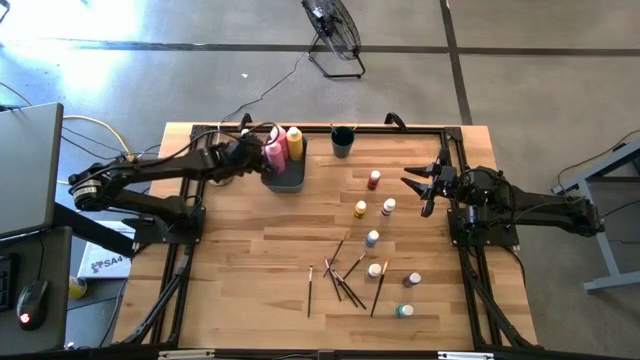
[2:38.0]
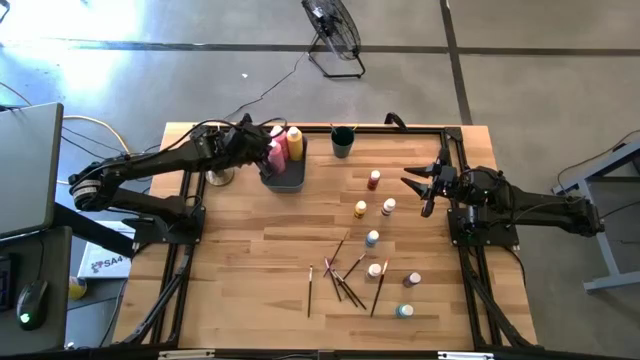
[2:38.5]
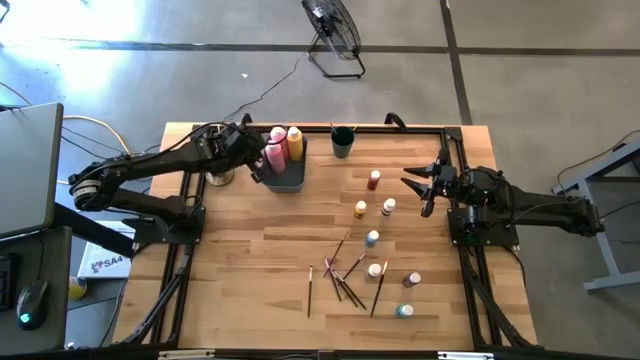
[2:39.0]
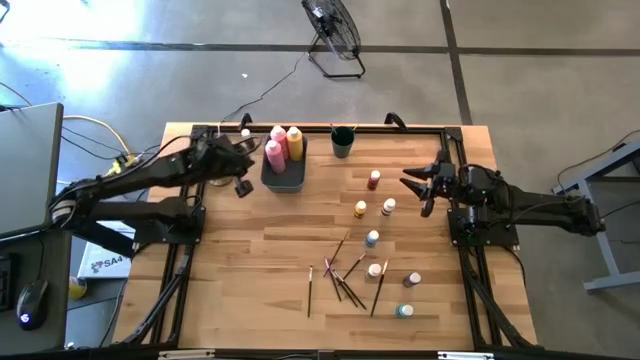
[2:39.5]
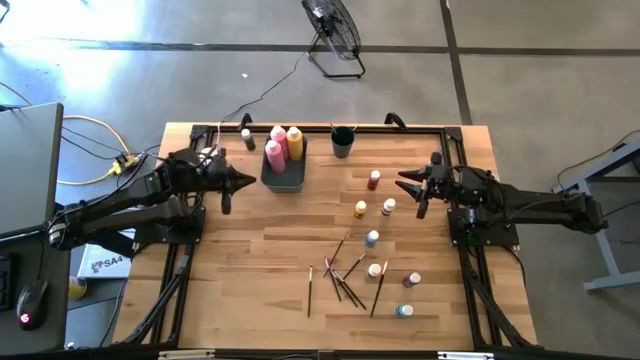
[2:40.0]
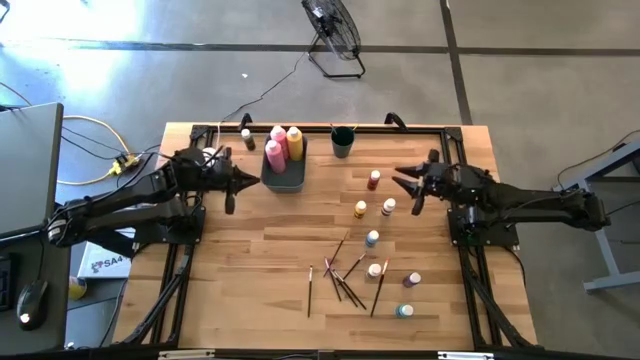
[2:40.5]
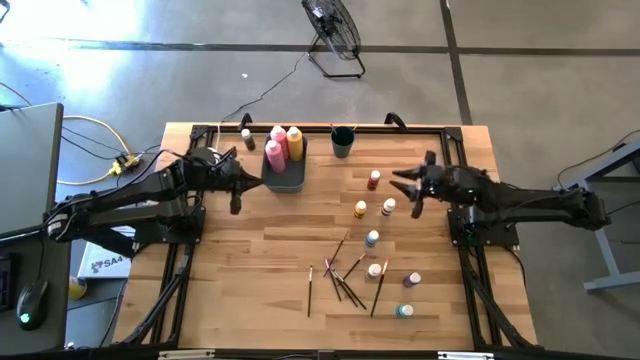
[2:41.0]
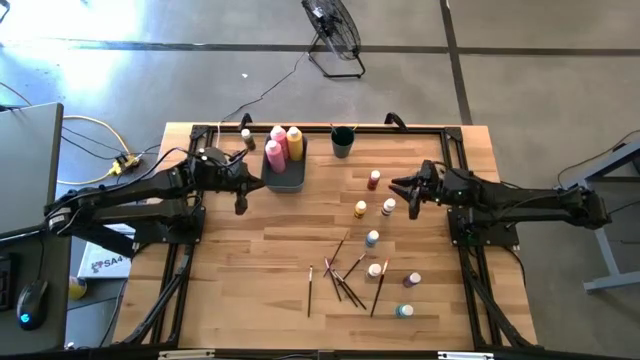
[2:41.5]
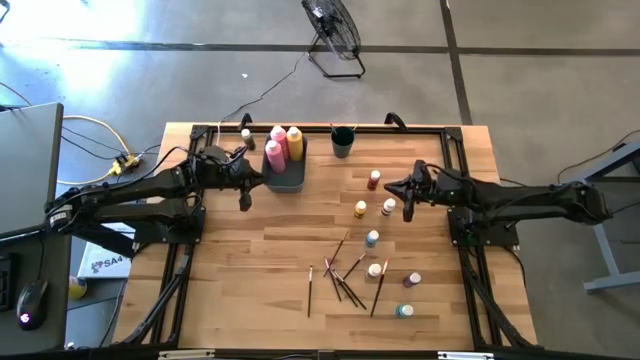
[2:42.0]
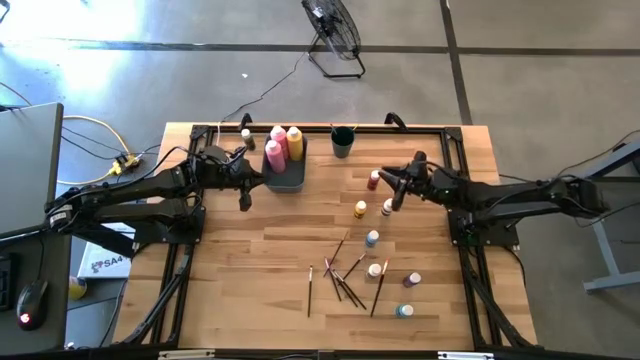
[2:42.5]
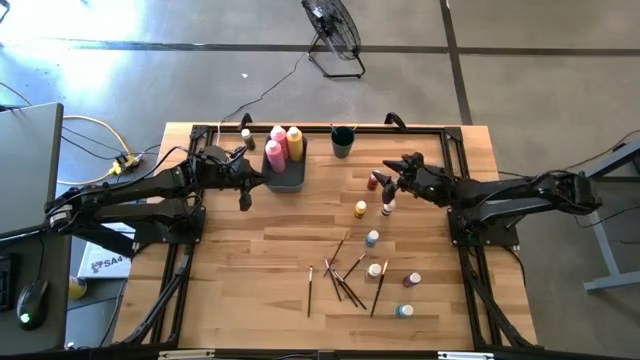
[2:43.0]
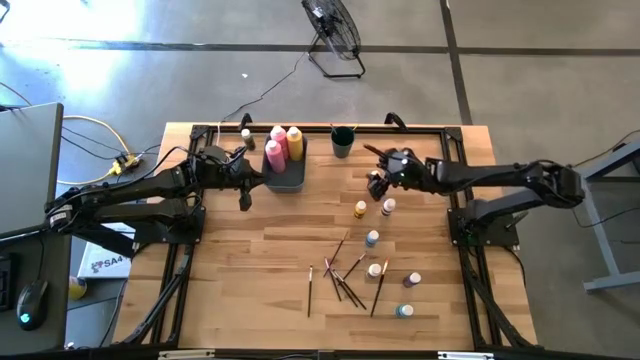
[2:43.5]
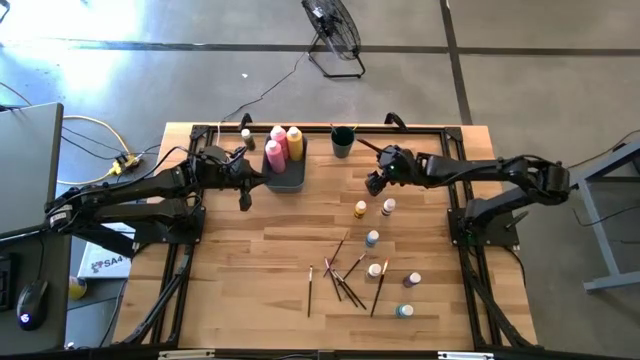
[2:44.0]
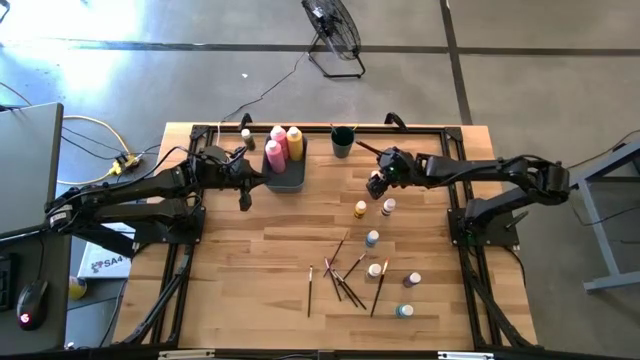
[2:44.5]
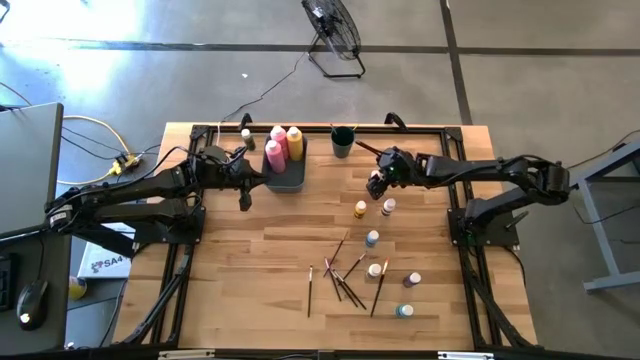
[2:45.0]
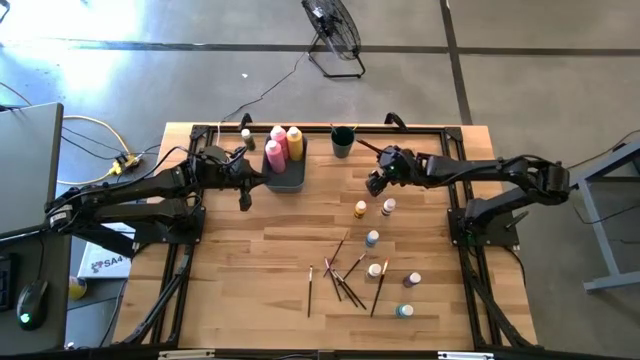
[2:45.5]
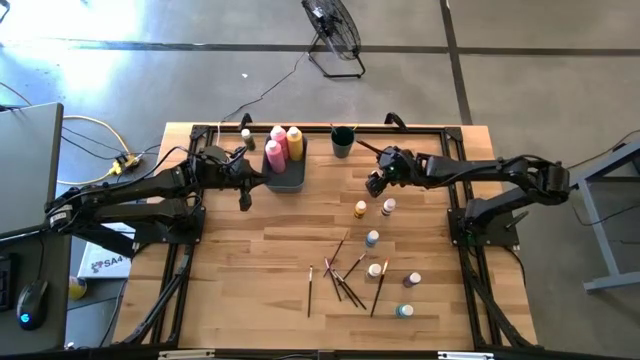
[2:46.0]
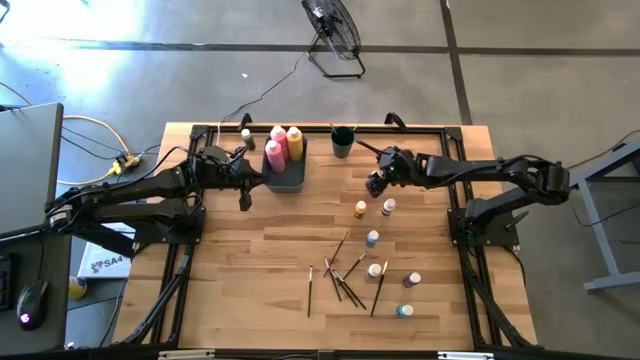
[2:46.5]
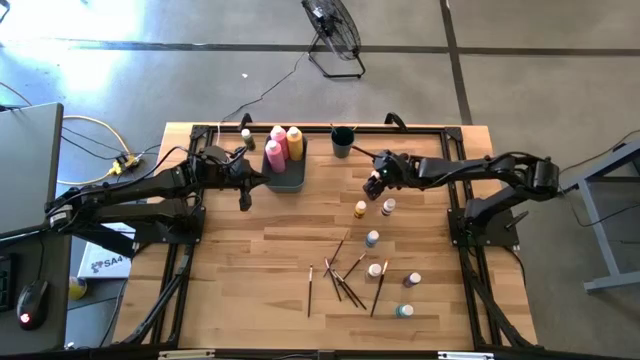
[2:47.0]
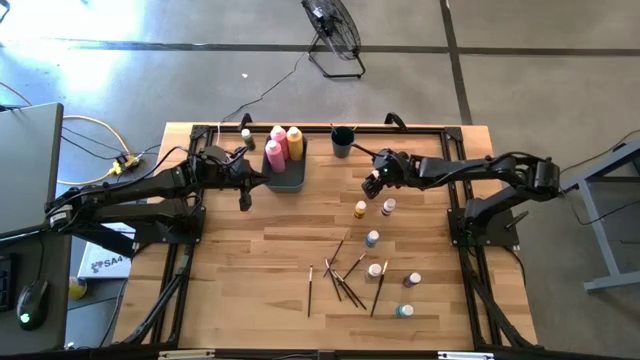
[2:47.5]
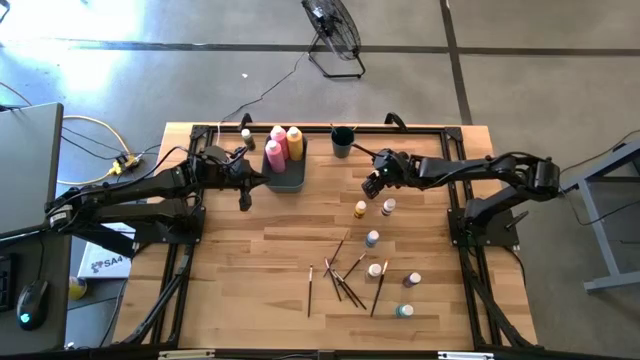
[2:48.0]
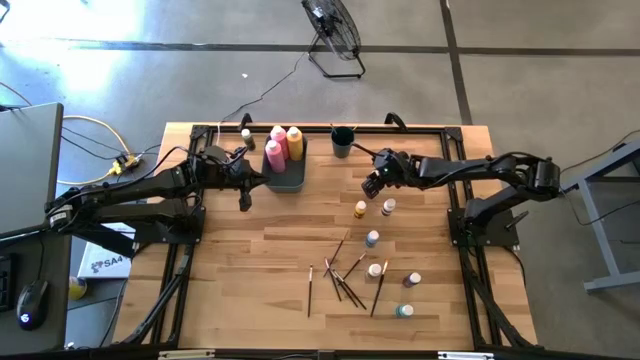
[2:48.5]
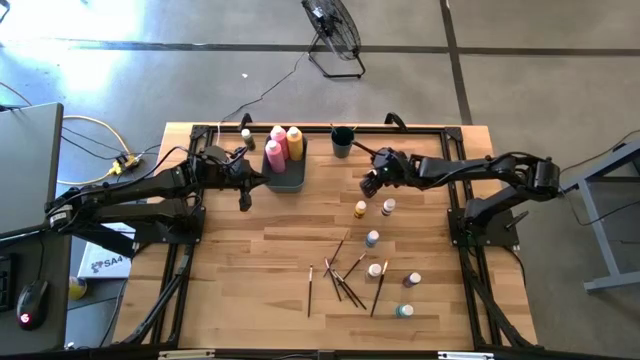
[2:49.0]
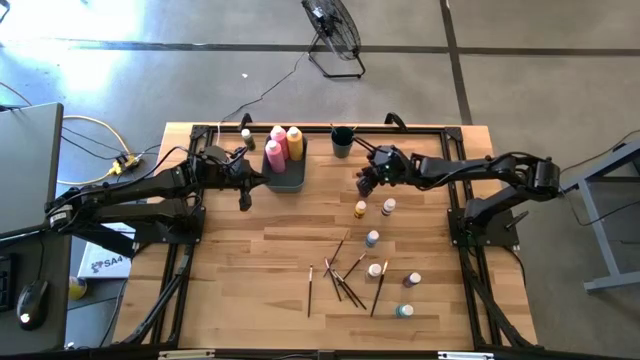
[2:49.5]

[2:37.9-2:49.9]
Task: Pick & Place Paint Supplies
Put the small red paint bottle into the green bin

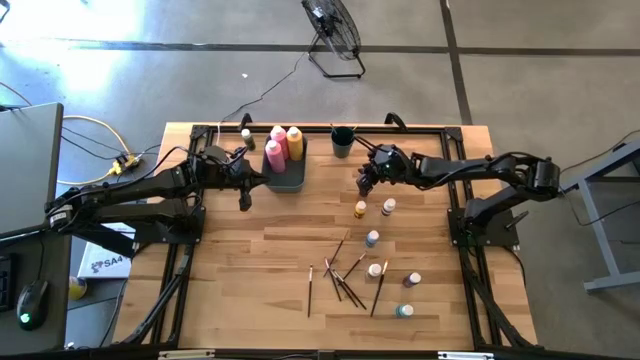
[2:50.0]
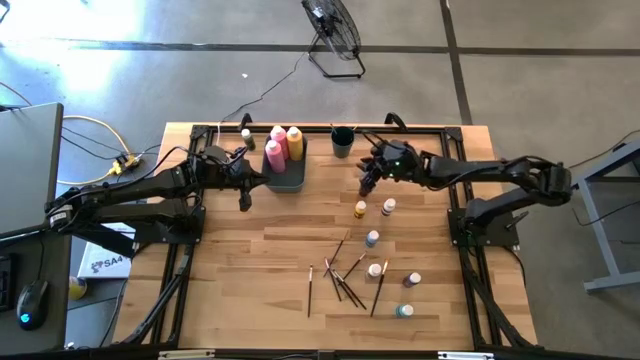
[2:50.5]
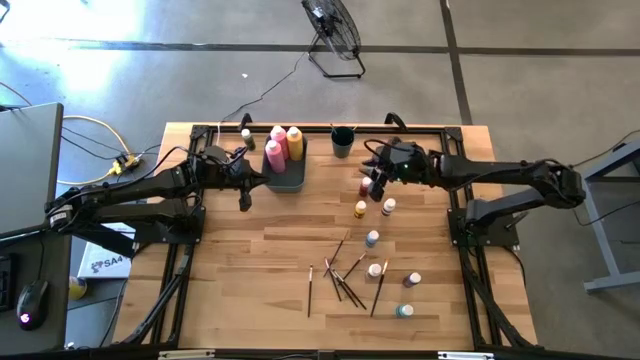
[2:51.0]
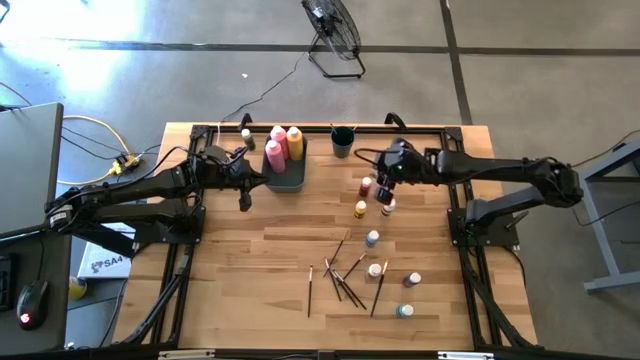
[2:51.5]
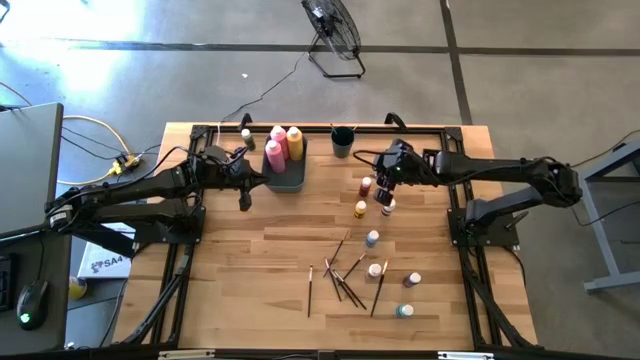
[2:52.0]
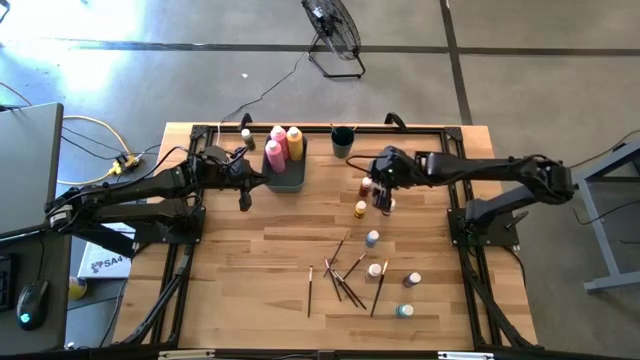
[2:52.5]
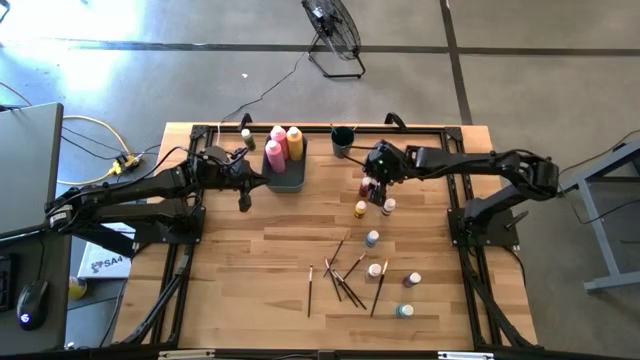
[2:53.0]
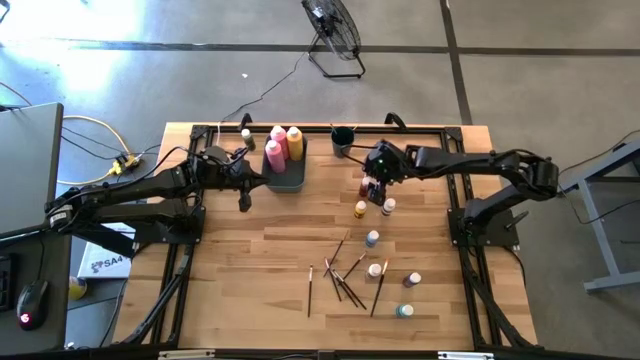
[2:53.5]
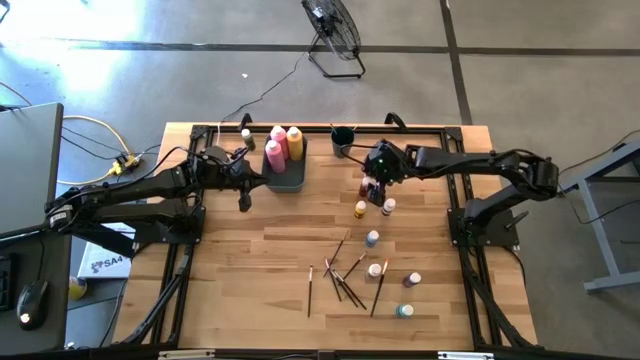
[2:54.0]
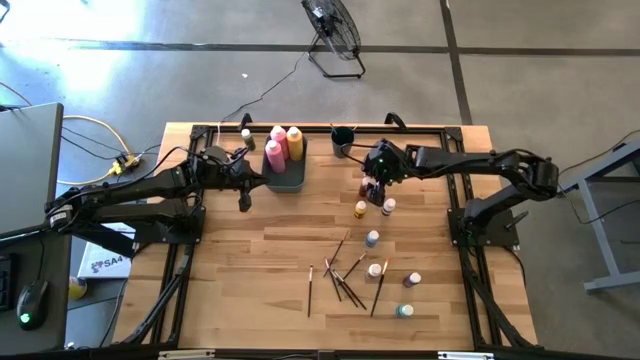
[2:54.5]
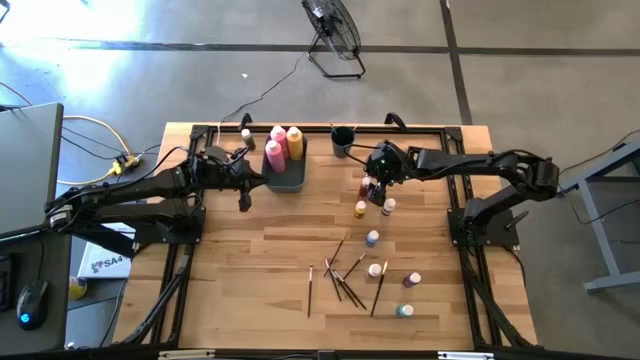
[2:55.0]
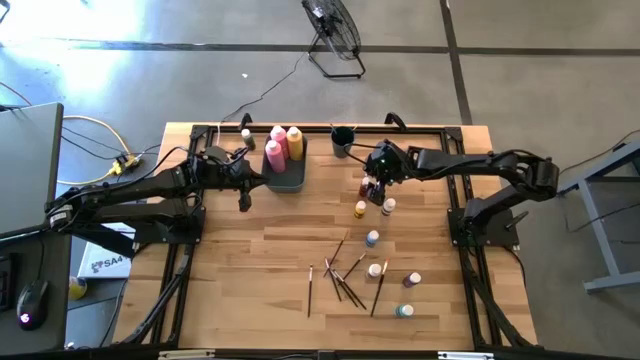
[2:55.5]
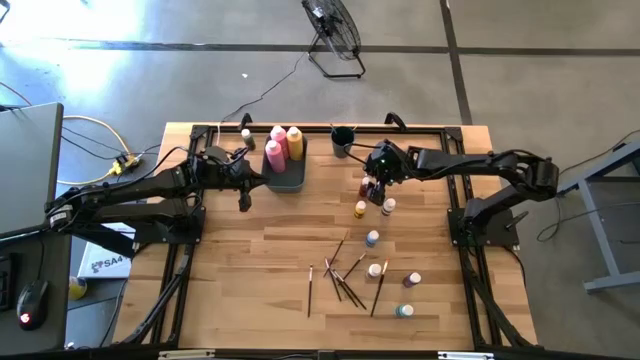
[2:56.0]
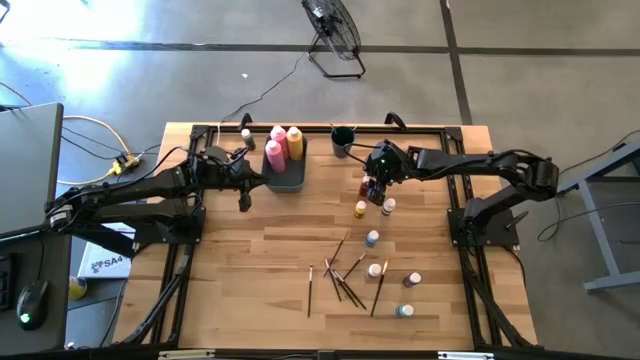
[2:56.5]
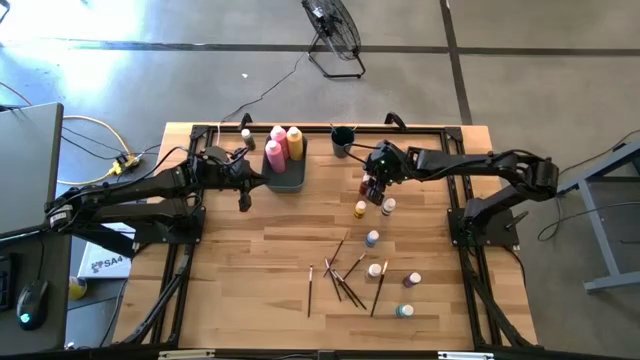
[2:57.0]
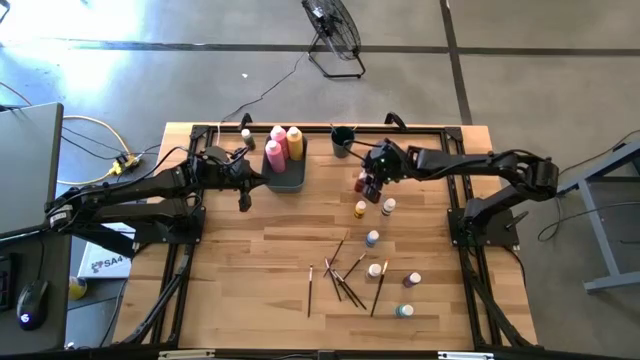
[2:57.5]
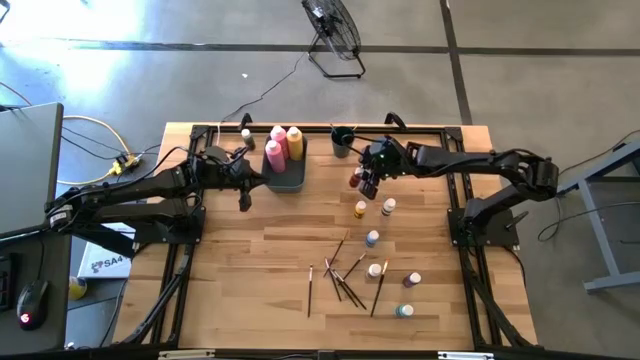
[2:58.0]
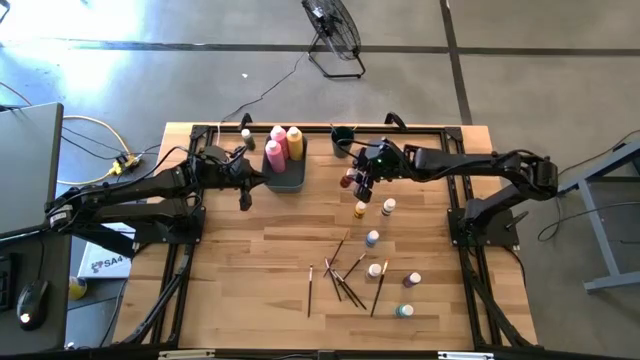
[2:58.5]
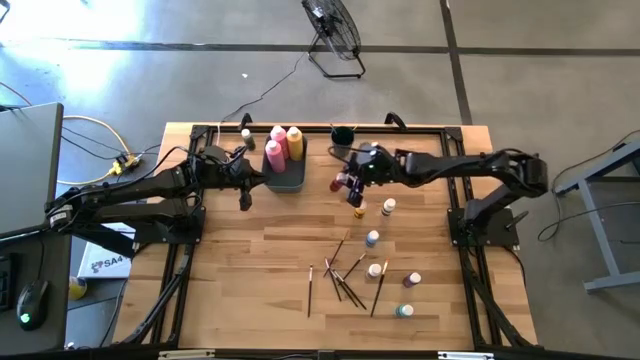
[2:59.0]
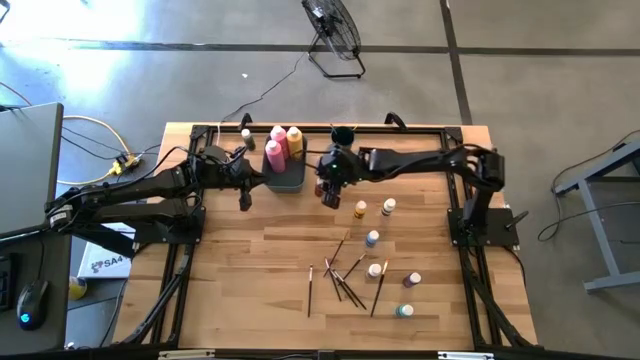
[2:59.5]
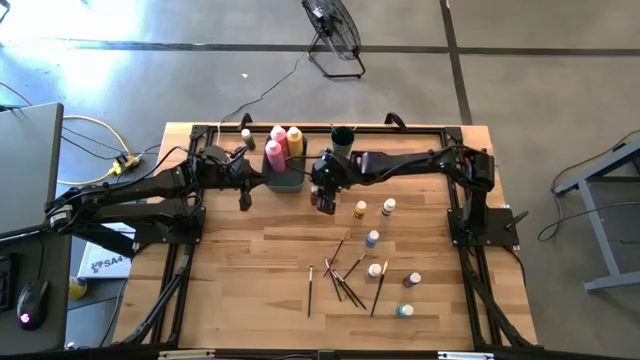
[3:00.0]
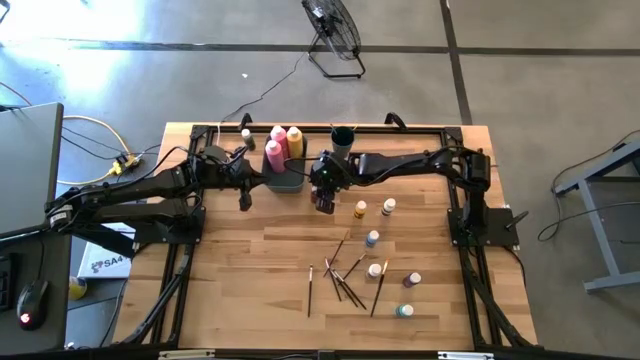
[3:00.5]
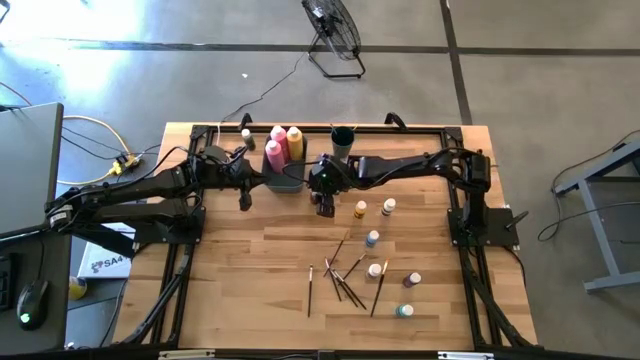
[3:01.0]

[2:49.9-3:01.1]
Move the red paint bottle from right to the middle of the table
